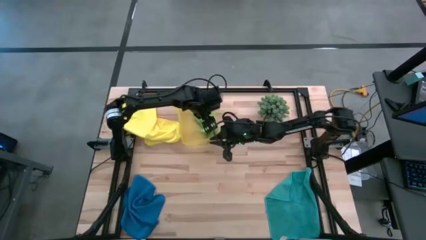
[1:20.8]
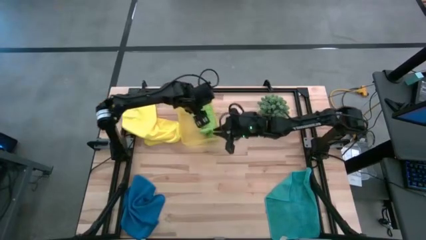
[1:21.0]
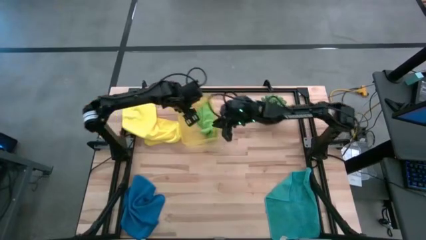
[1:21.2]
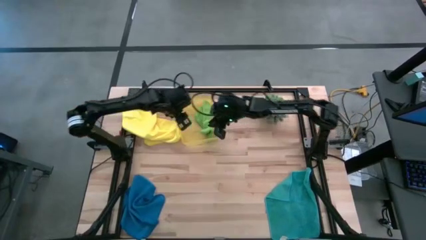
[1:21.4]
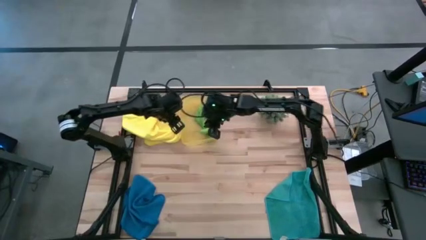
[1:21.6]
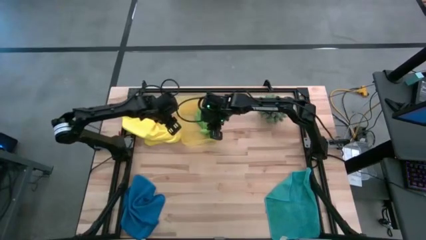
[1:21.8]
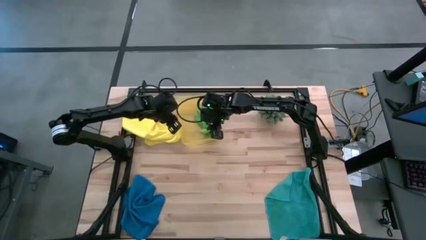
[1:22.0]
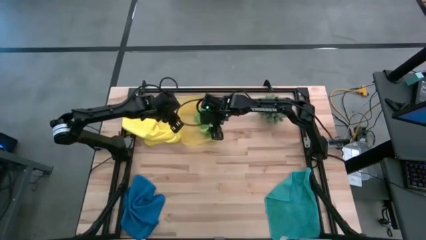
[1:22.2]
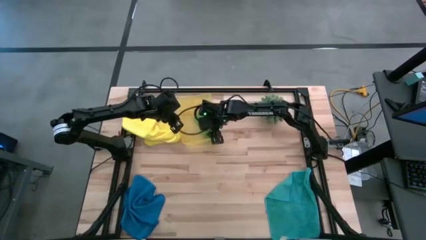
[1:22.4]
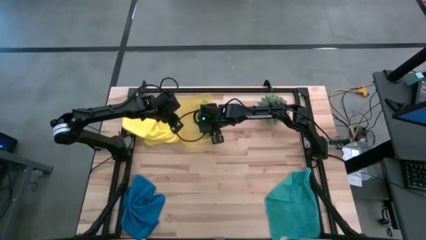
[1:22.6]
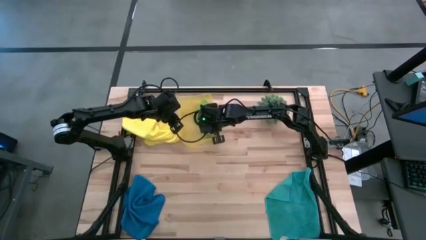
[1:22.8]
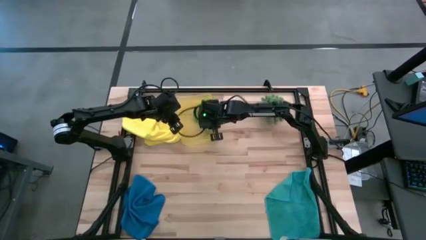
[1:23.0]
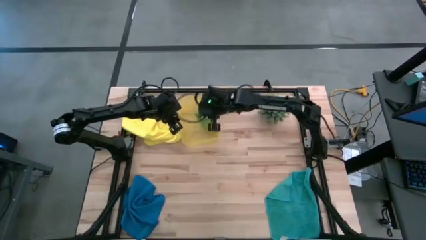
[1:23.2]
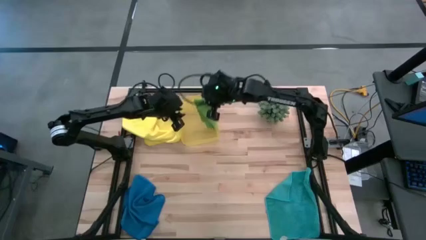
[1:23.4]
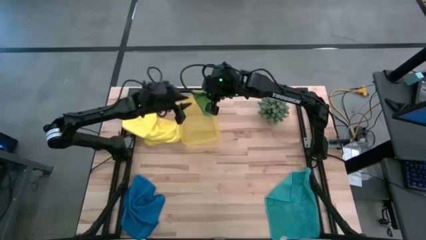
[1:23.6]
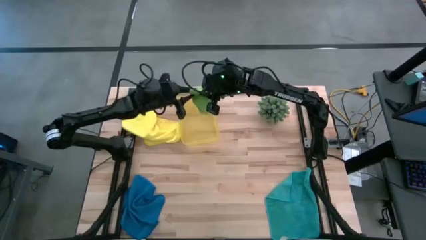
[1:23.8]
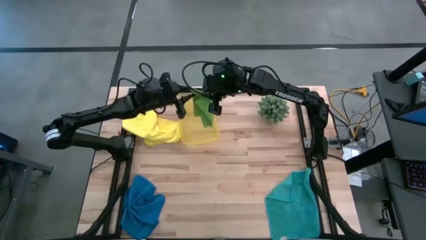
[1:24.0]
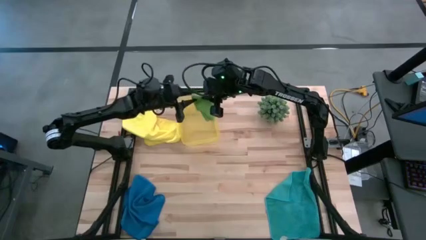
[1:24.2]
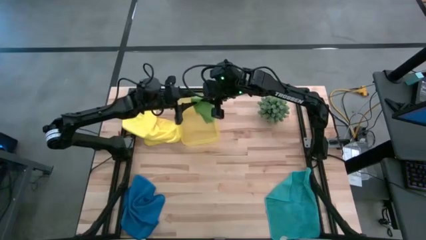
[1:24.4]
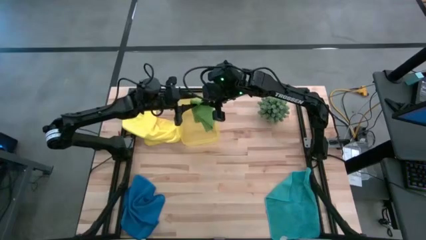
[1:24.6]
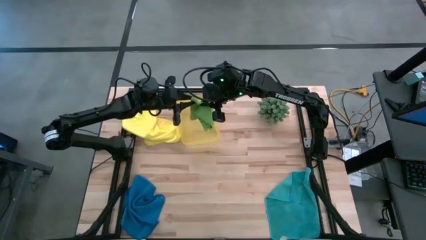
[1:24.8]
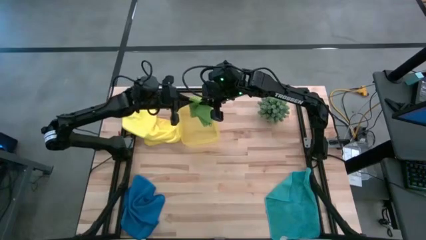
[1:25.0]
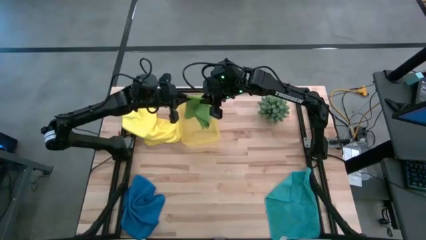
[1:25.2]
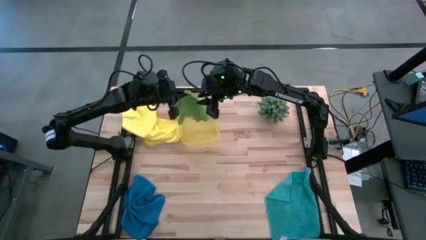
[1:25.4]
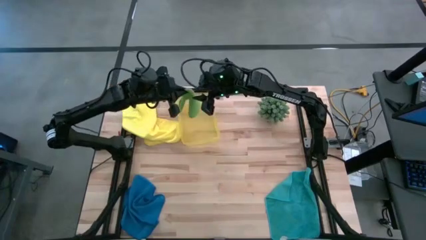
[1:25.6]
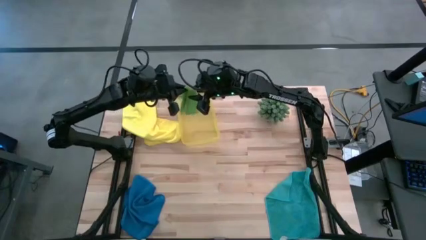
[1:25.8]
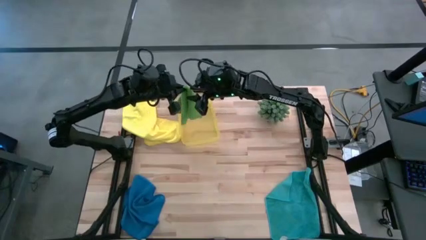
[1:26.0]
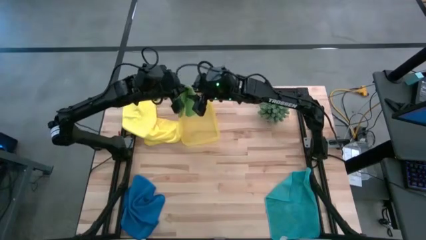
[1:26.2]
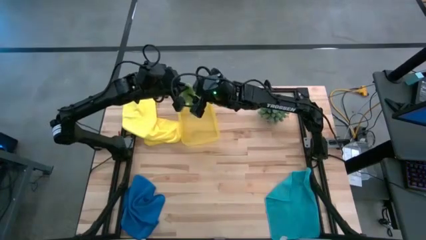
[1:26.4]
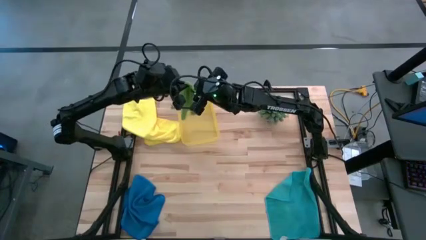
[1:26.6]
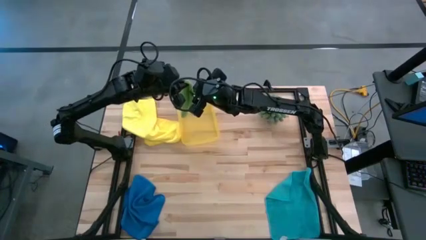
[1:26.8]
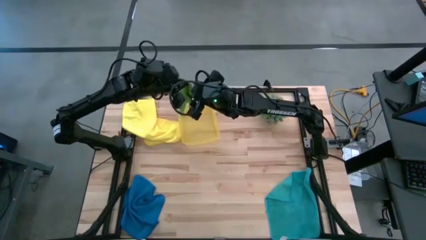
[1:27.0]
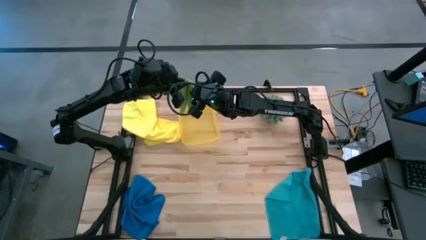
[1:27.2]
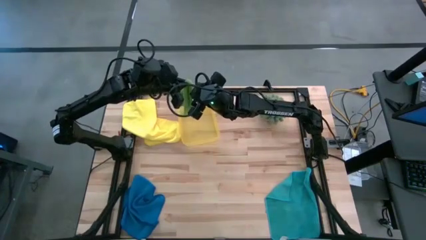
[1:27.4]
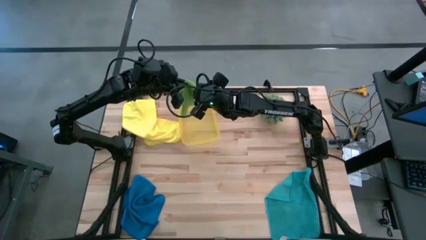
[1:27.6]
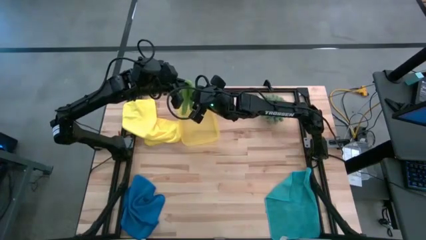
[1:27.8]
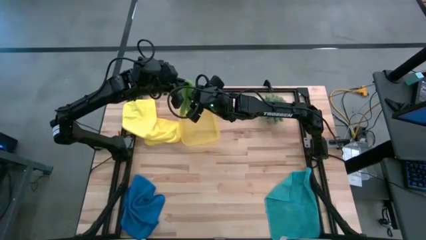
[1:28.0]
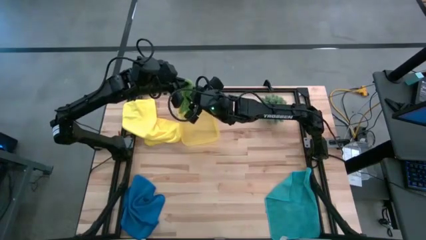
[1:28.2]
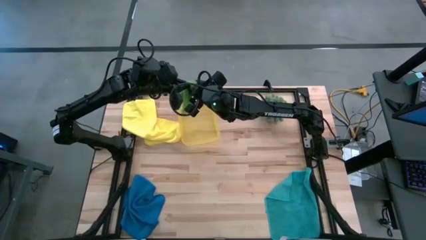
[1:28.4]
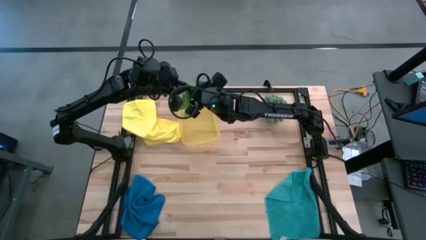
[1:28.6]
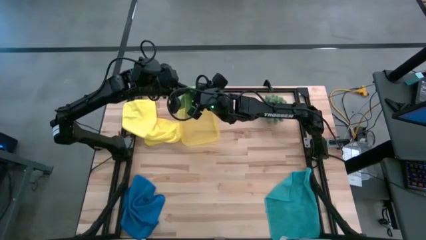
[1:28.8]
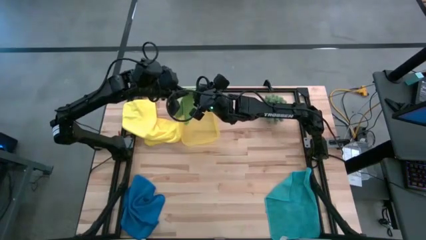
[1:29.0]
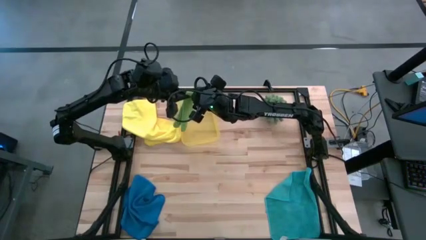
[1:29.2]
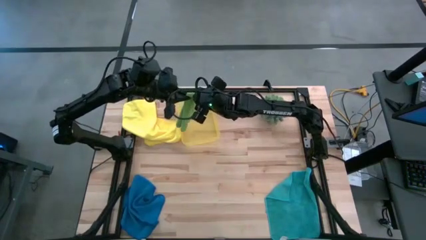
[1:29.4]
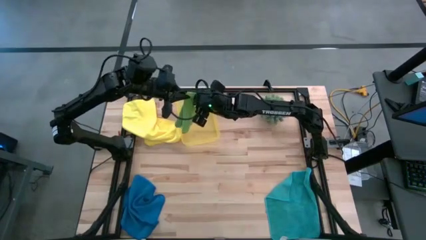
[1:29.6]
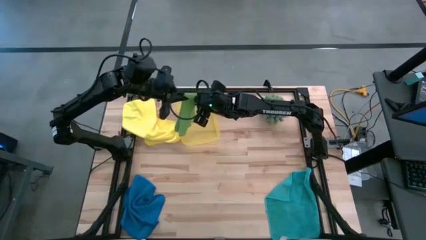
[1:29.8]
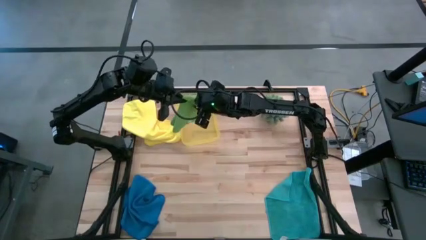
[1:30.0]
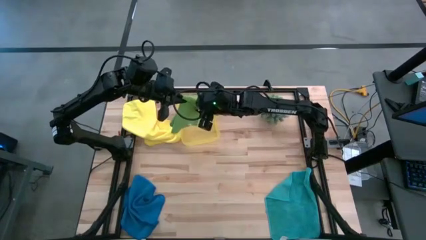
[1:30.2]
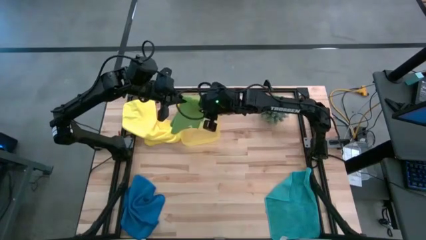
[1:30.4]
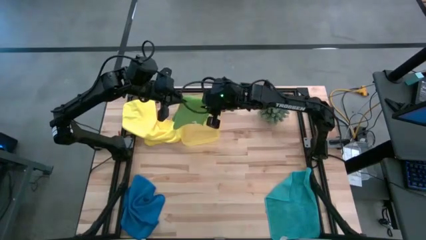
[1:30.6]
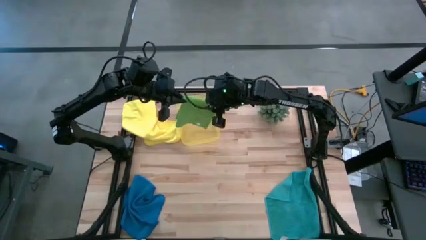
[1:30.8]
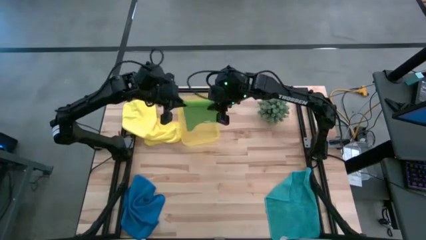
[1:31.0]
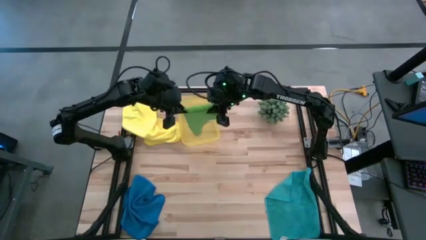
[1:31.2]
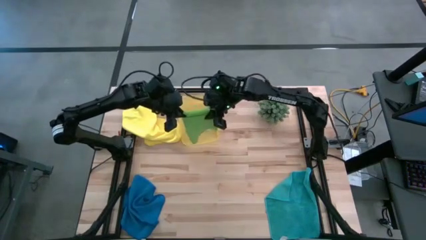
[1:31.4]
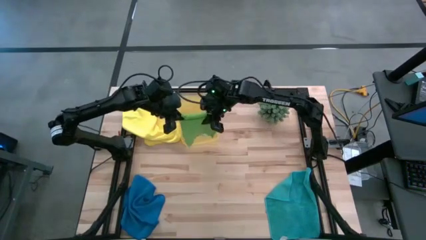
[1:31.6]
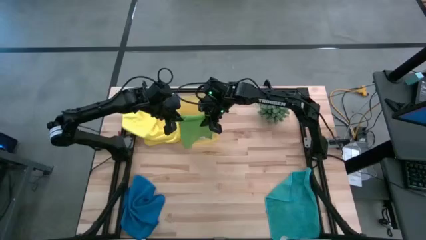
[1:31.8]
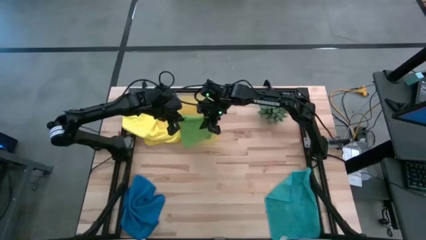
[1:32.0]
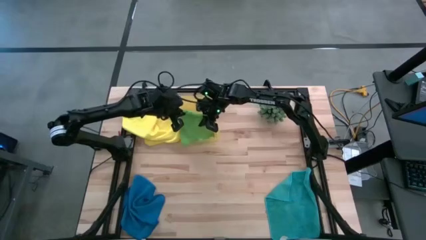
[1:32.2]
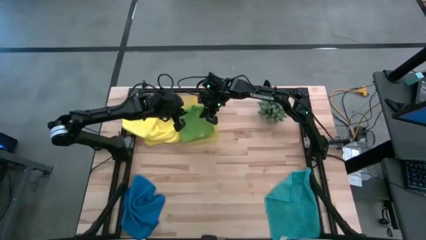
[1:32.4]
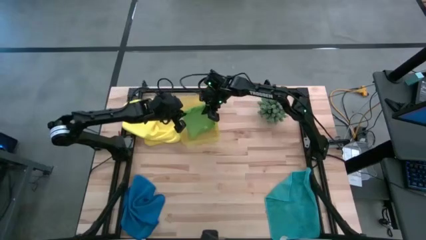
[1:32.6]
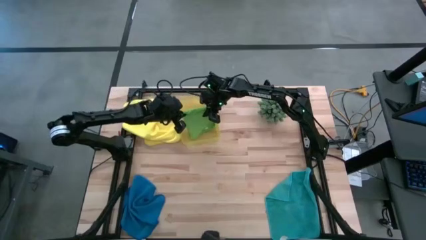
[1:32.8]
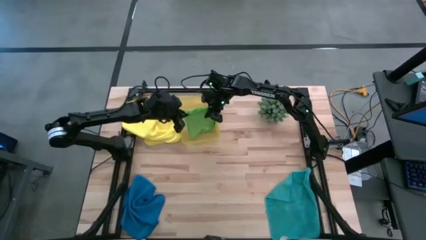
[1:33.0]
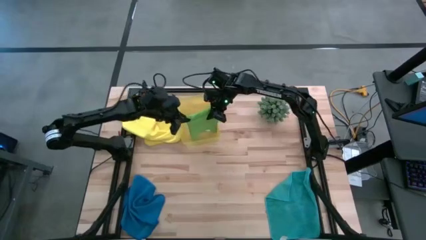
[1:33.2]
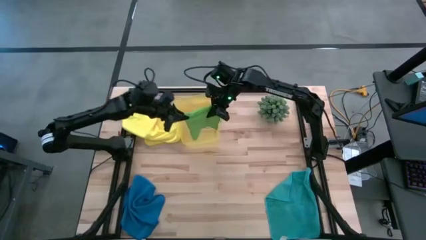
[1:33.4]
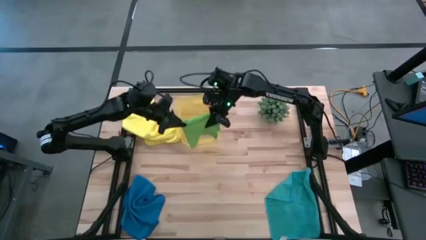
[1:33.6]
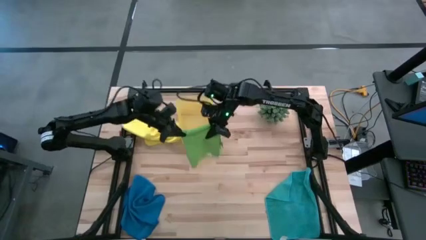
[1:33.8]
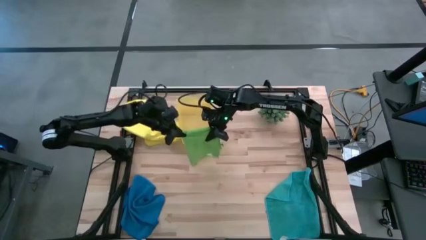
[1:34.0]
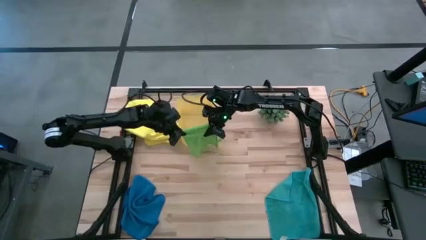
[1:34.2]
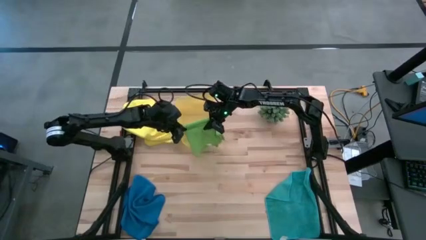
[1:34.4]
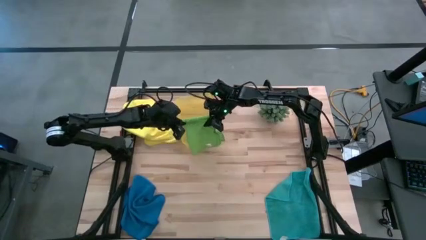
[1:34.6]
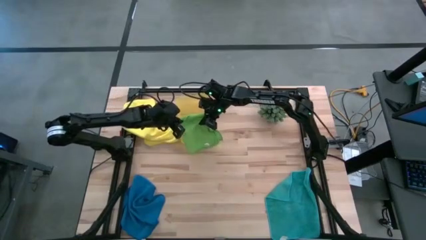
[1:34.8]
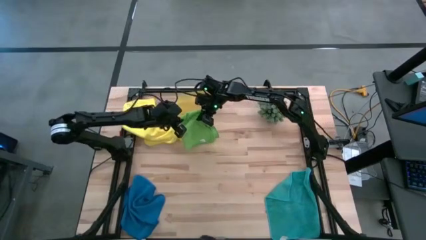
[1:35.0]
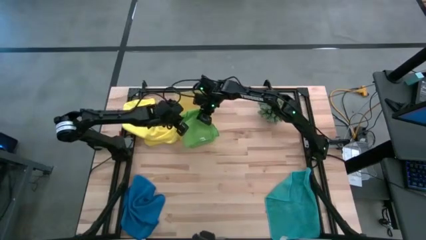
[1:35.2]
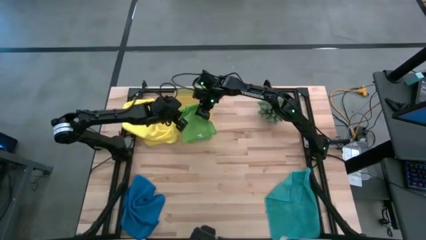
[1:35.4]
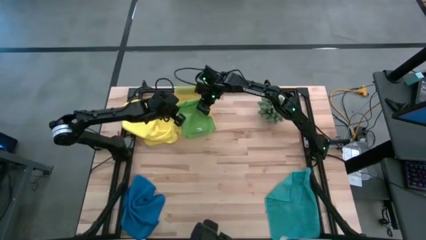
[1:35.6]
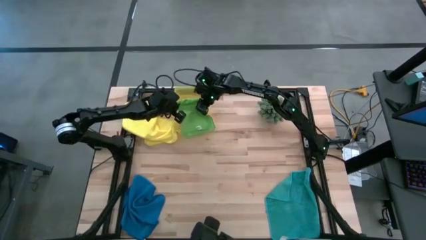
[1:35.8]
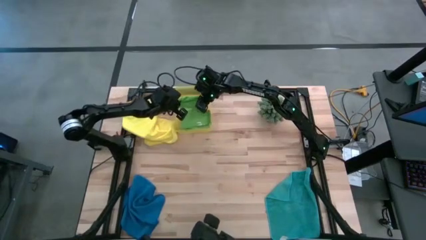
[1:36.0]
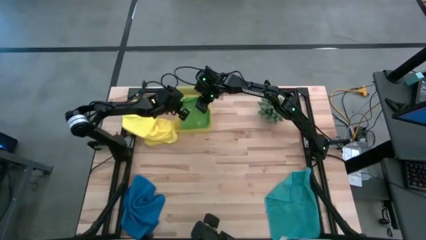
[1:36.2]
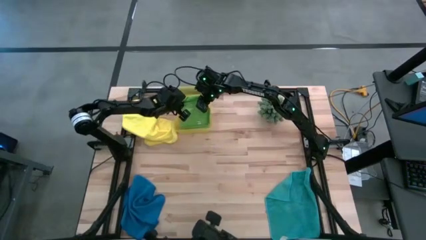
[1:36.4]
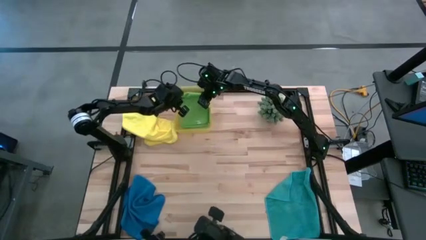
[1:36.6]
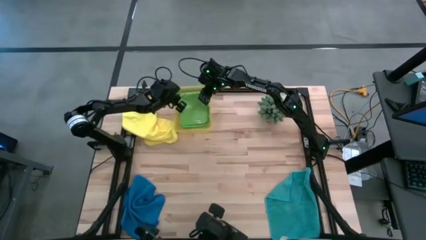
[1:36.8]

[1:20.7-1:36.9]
Task: Fold microfiber towels
Put the green microfiber cloth into the yellow bin
